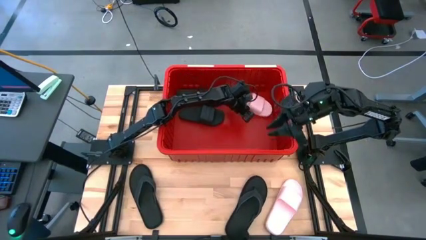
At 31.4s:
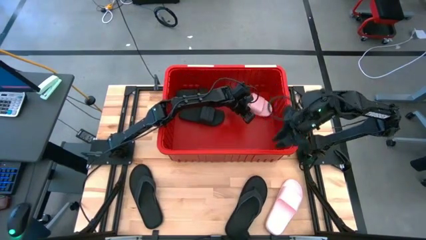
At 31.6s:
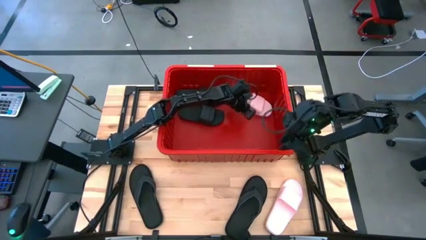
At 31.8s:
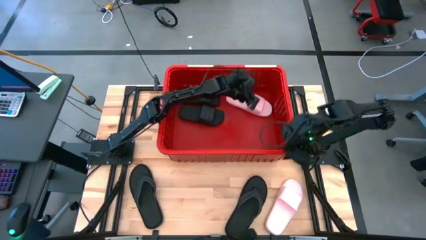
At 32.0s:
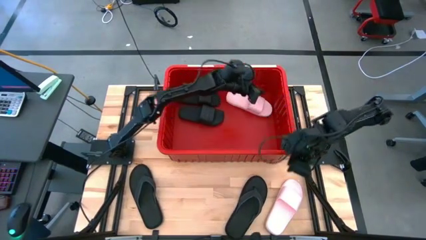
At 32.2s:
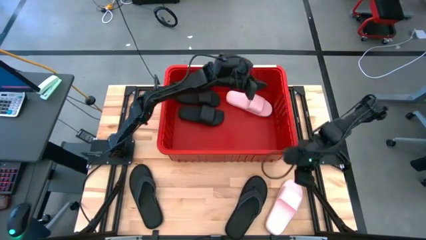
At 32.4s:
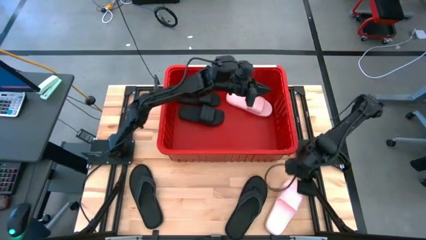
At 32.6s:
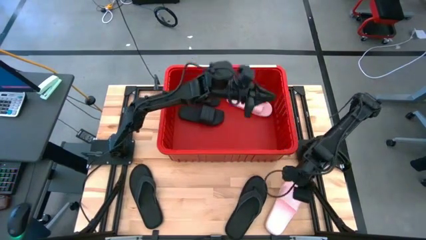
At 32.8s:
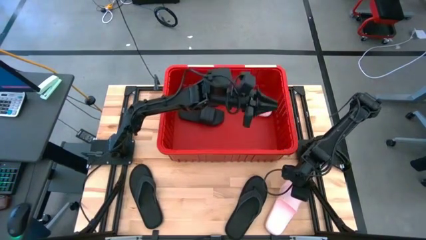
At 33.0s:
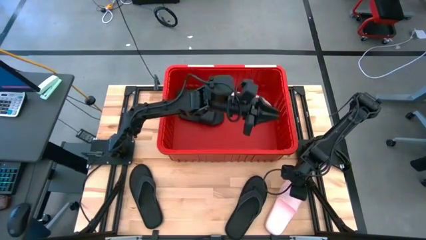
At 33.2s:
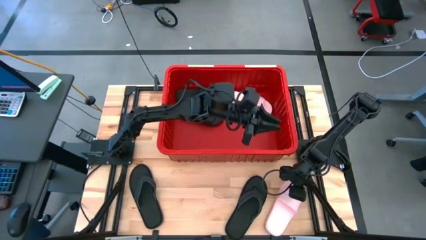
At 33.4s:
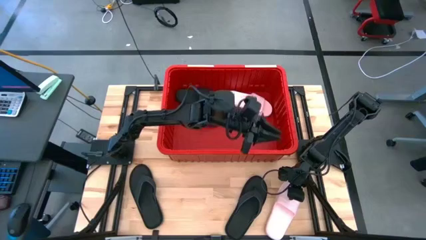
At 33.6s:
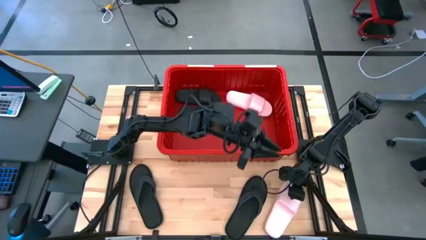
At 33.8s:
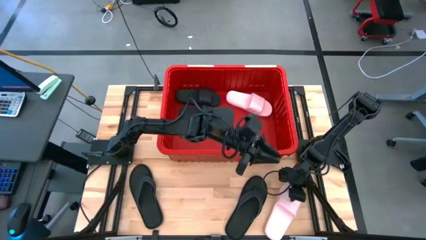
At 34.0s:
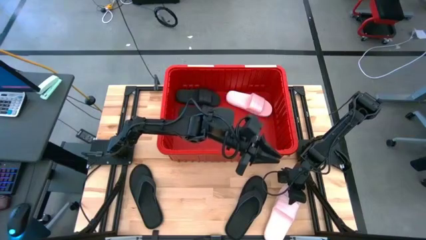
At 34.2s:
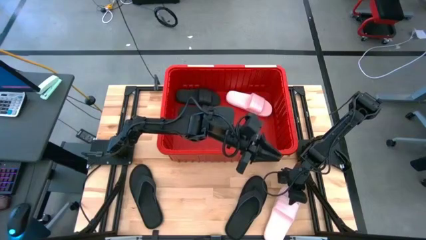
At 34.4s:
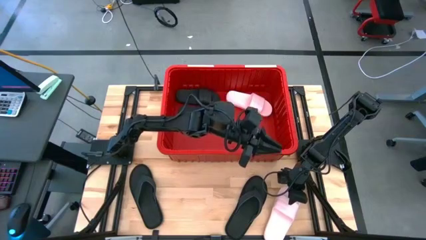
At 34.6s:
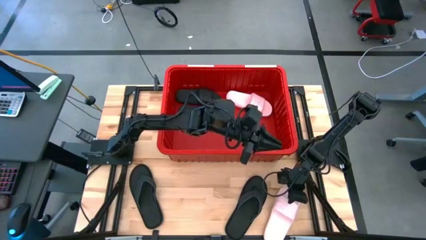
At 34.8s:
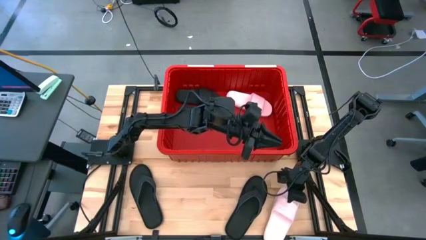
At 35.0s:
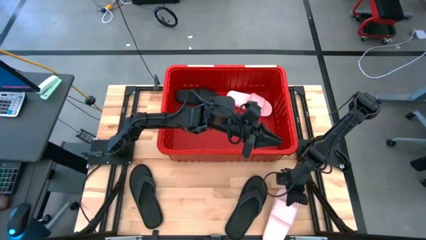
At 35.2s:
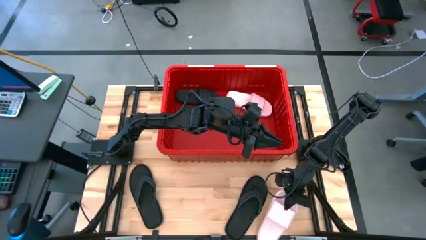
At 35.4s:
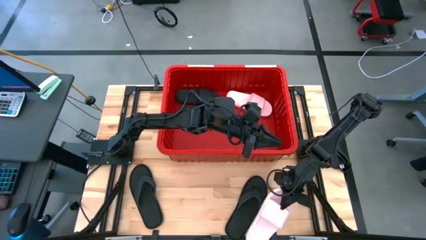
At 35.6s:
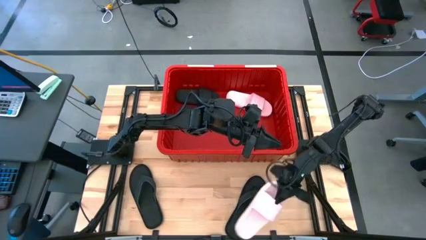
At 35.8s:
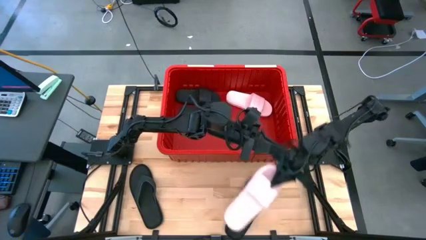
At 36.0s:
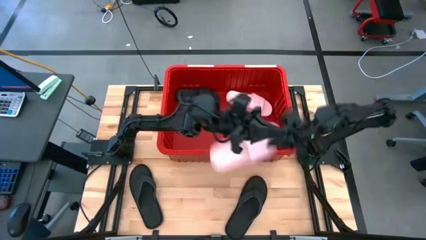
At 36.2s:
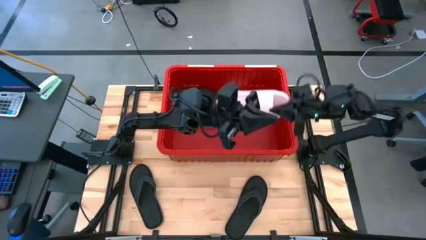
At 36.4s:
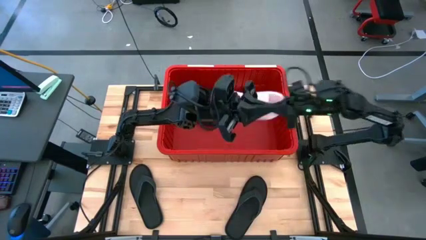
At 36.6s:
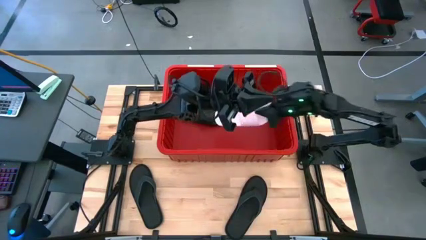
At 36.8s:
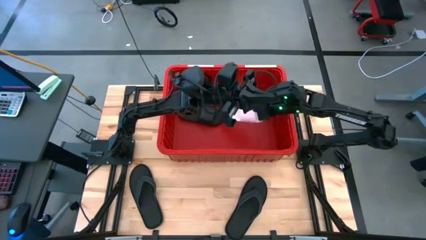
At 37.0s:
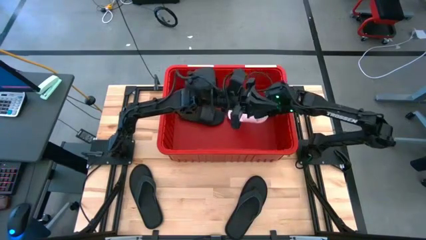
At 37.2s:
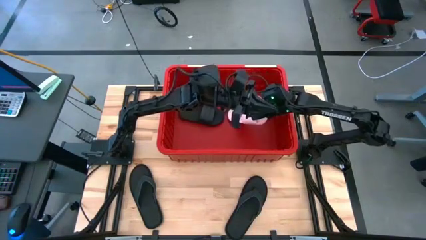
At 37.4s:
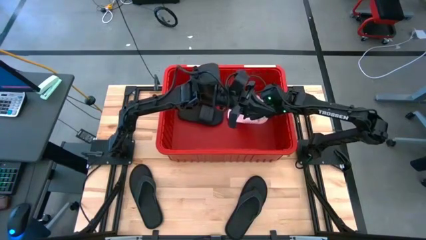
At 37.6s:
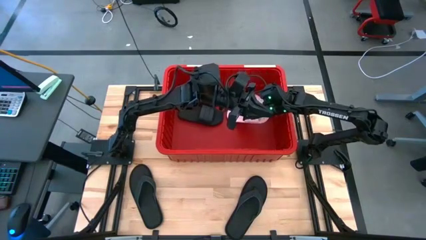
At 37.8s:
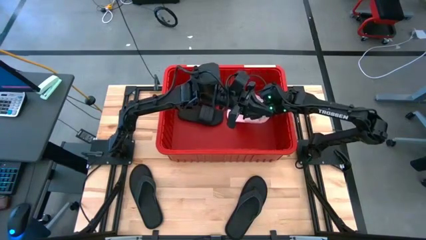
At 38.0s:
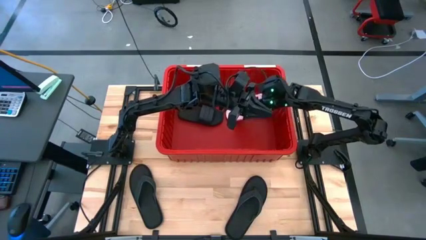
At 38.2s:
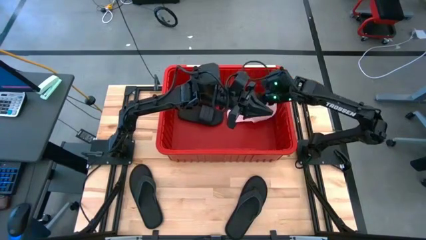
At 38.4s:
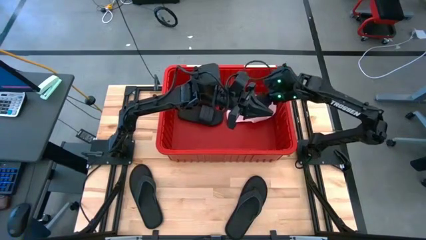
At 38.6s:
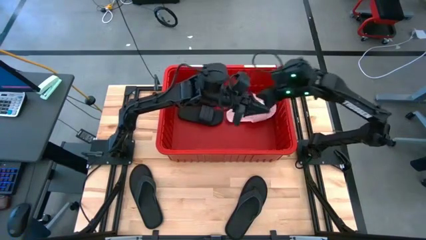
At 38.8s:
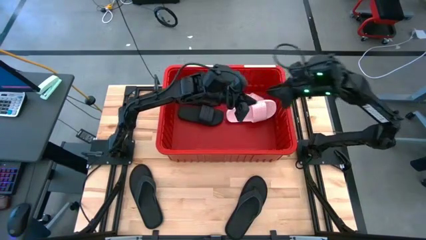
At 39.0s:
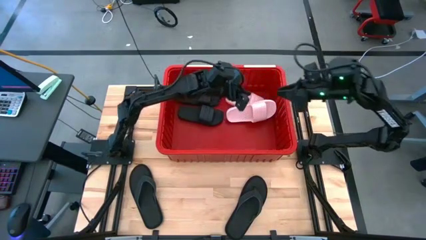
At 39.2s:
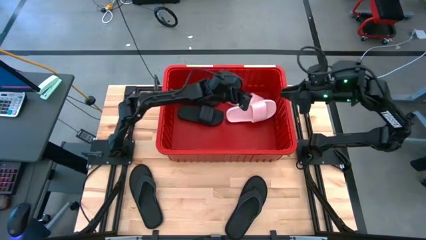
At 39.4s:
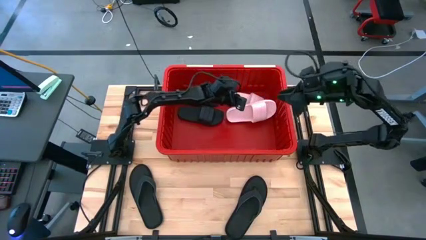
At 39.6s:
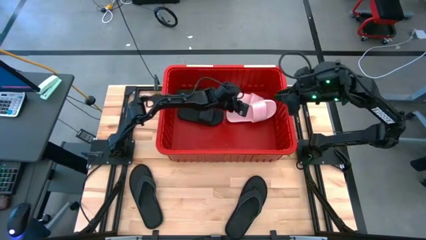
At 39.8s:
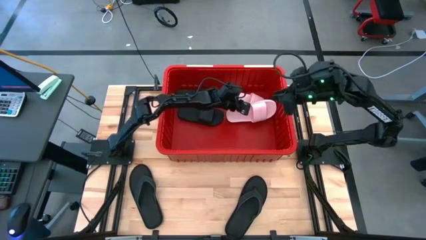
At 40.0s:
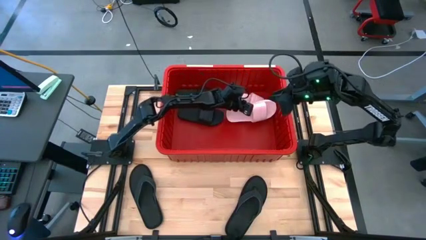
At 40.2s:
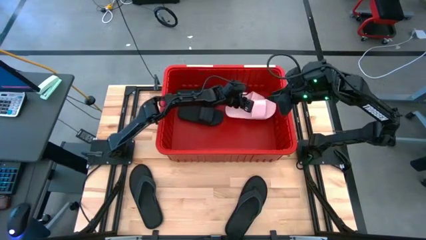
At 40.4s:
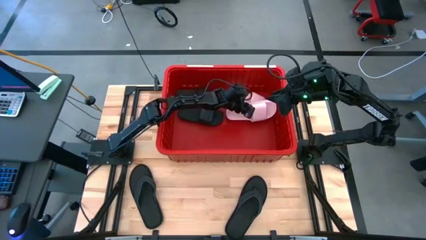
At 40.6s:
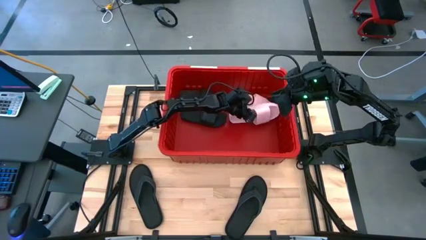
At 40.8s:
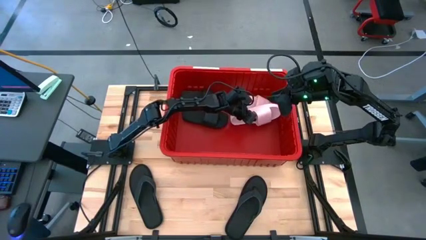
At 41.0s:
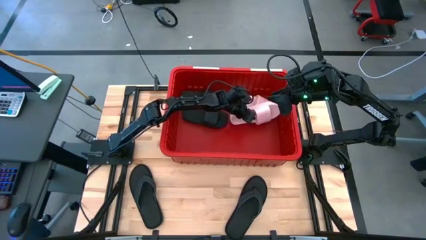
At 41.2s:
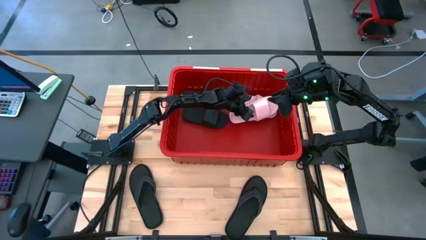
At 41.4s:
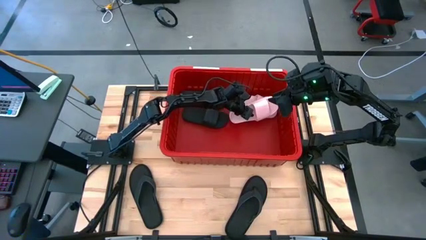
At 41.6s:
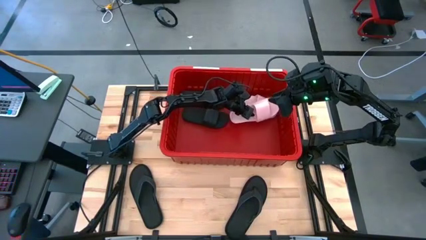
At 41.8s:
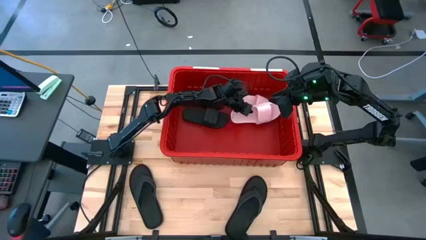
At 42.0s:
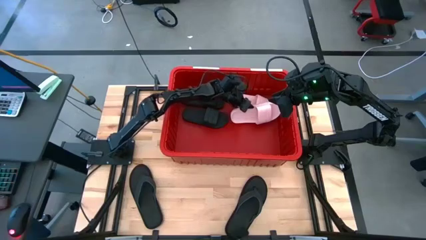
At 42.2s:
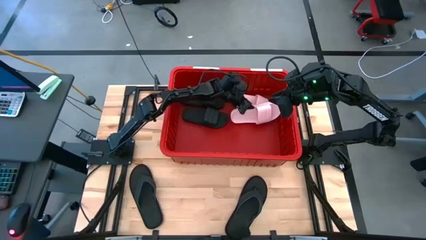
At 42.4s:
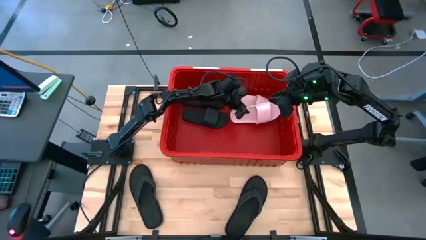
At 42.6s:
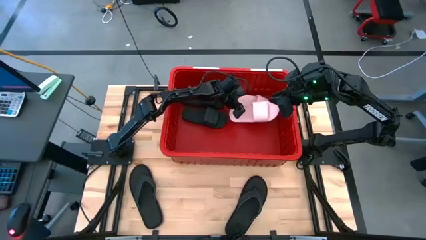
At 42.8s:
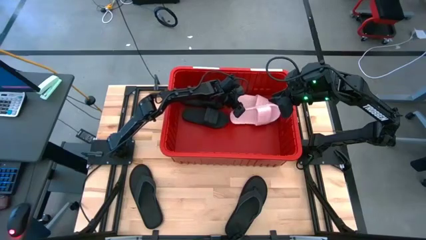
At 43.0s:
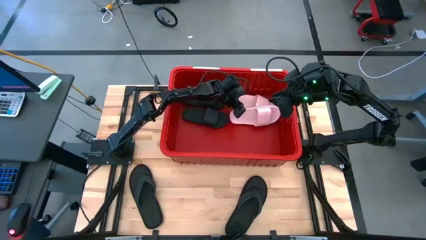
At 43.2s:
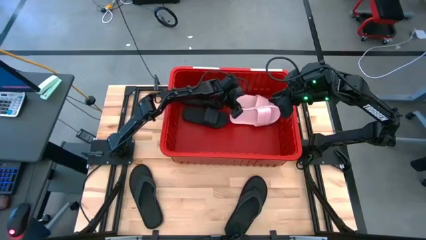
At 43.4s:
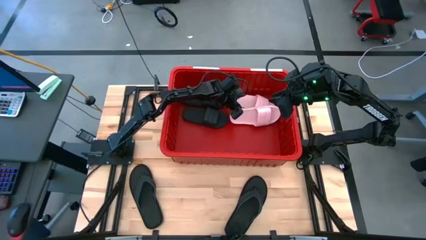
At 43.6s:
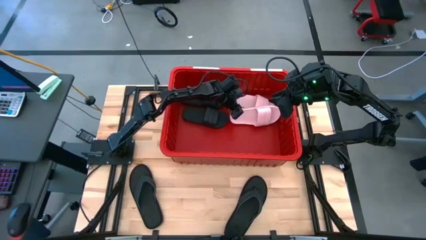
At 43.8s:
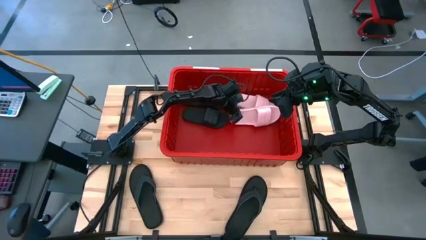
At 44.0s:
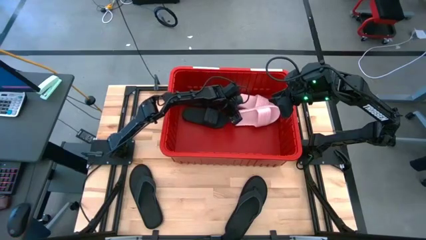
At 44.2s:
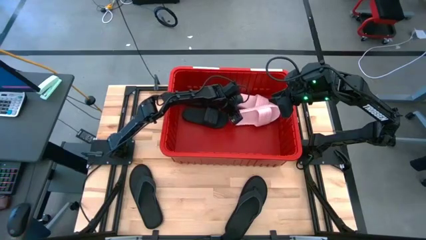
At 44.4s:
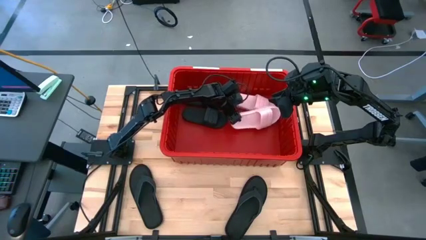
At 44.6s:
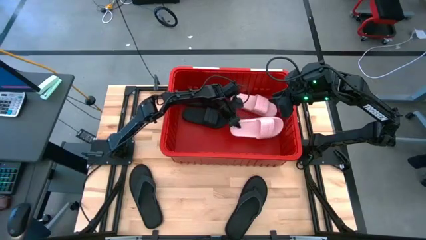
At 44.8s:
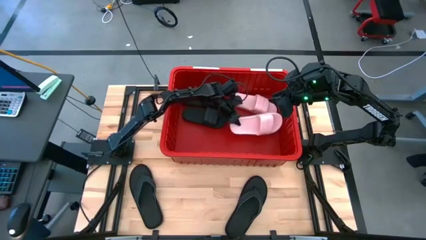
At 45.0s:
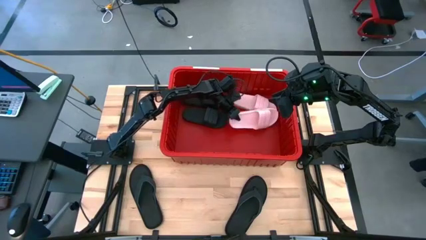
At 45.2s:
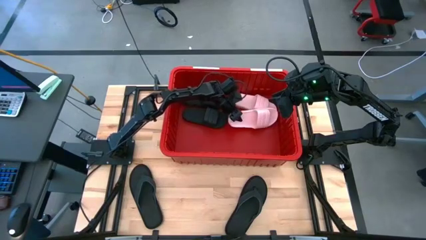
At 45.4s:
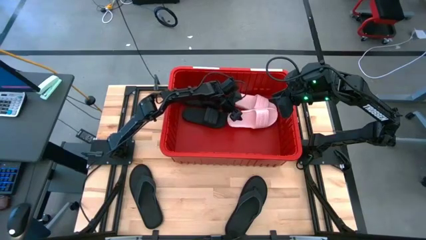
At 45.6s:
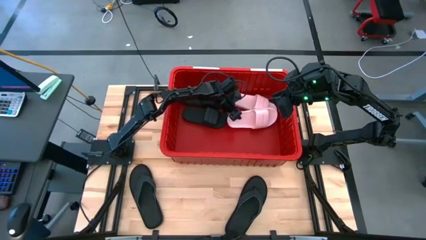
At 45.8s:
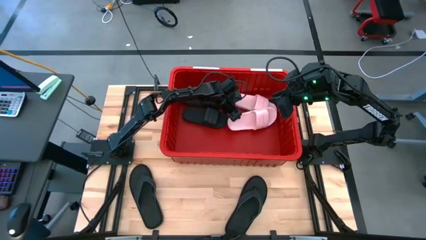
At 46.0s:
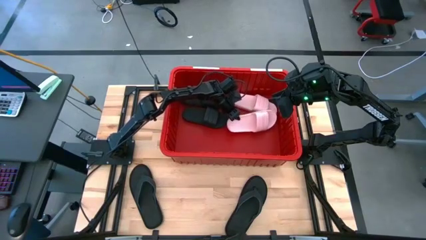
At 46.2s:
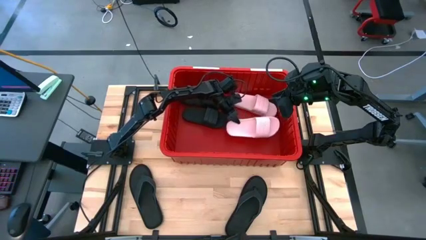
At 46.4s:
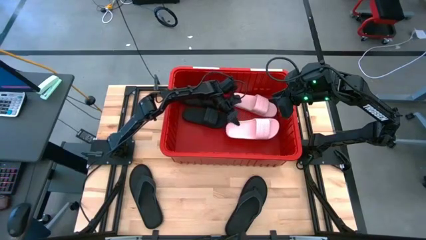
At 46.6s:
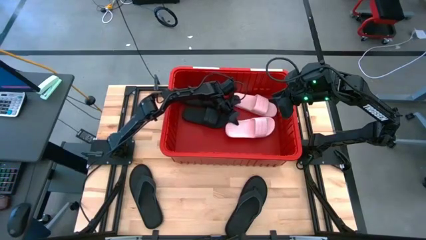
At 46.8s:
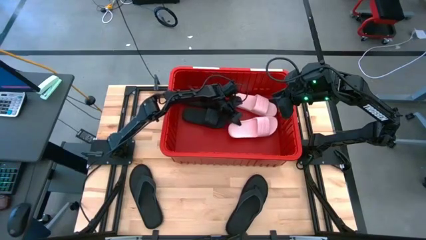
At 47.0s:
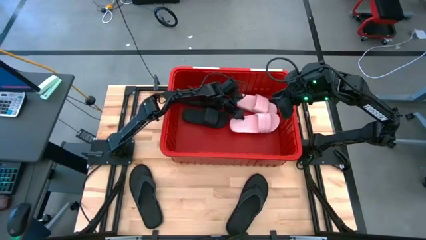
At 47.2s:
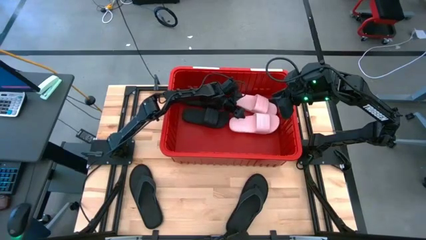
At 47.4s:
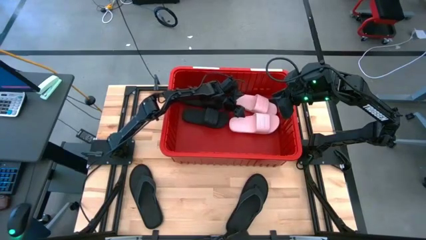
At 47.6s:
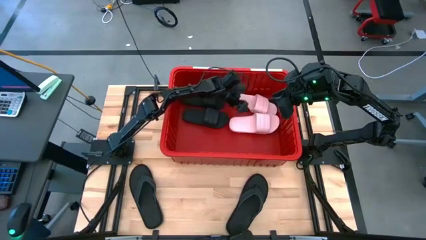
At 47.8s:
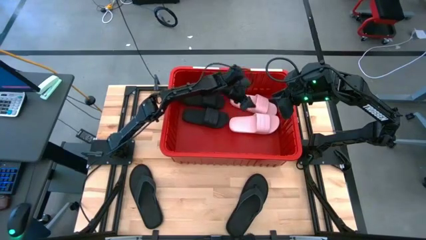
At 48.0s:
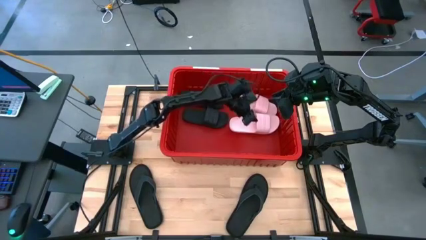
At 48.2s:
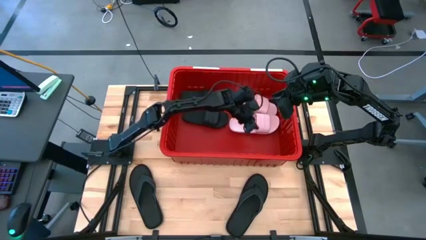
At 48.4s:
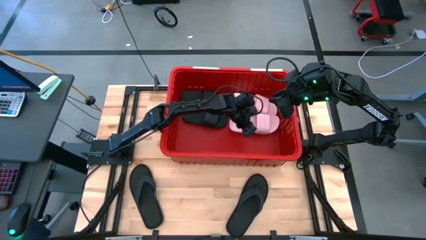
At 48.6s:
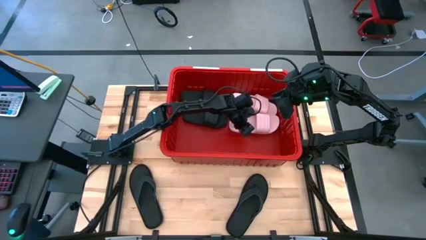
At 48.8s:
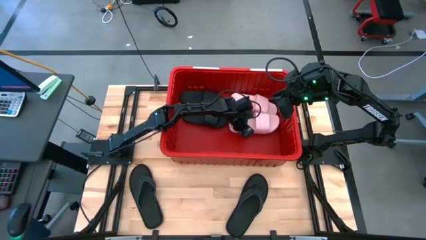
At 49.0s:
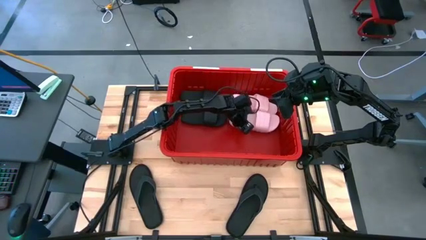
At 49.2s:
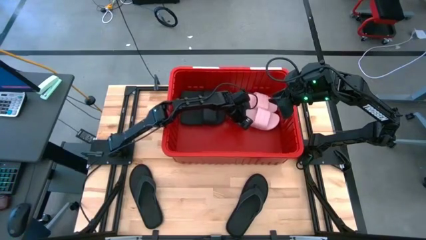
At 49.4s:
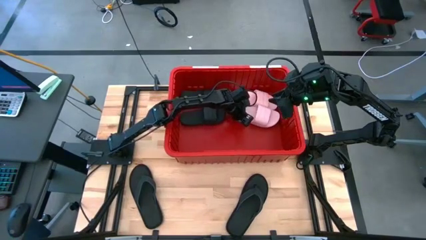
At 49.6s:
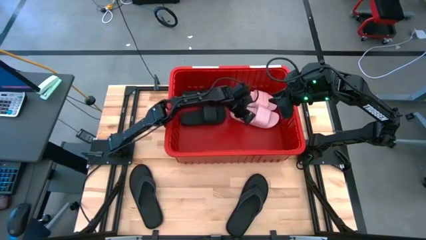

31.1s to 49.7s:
Task: Pick and place slides into bin
Put the pink slide into the red bin and align it with the other pink slide
